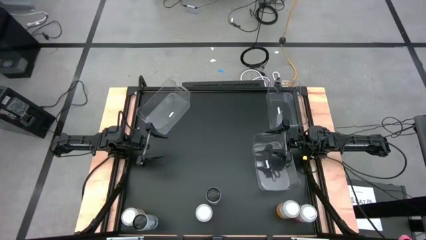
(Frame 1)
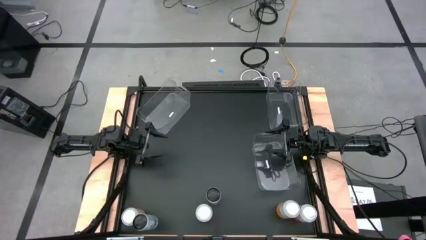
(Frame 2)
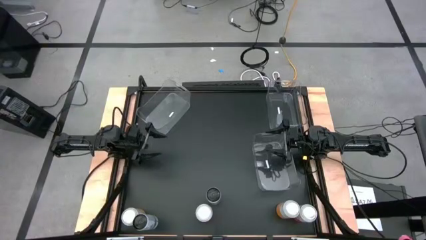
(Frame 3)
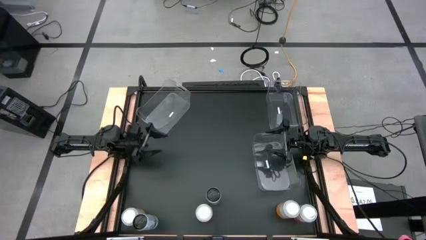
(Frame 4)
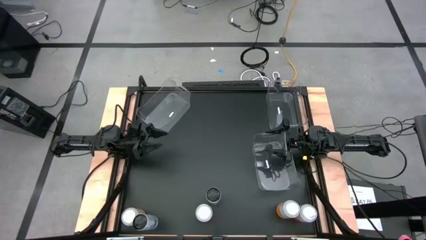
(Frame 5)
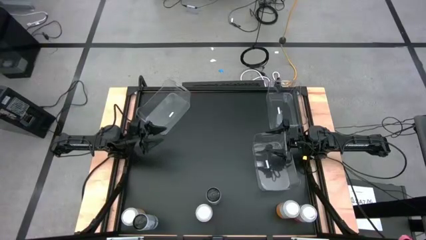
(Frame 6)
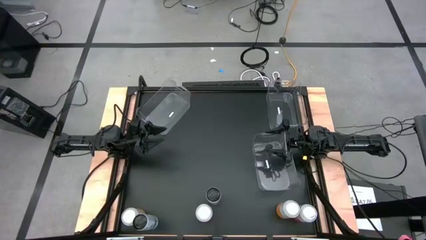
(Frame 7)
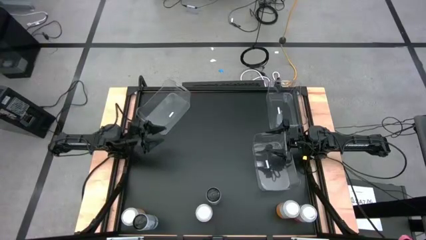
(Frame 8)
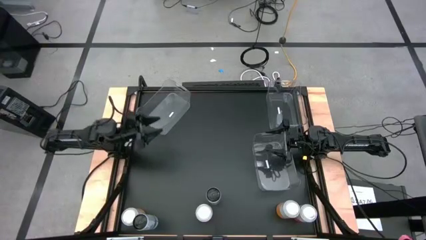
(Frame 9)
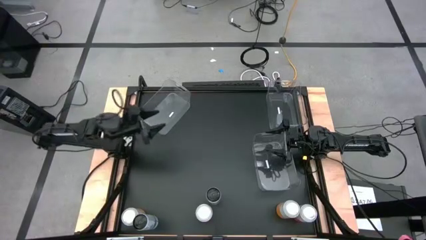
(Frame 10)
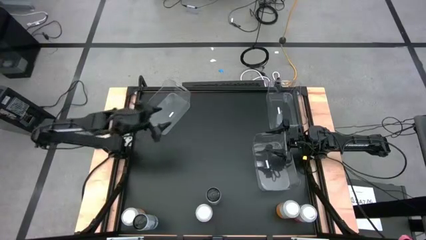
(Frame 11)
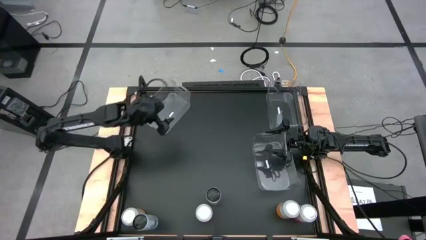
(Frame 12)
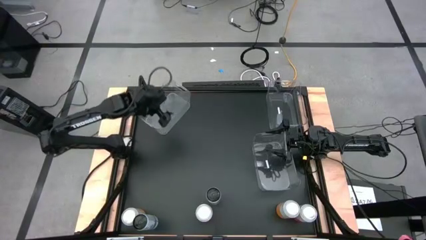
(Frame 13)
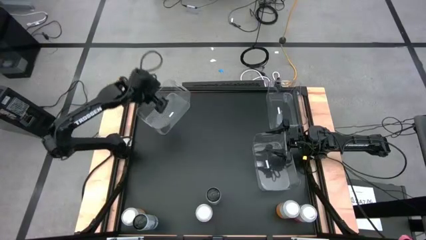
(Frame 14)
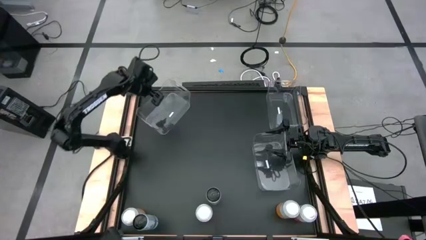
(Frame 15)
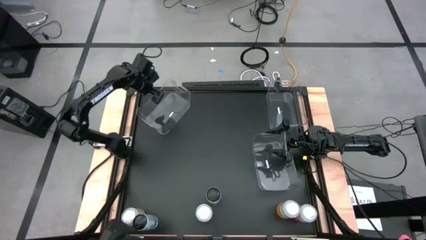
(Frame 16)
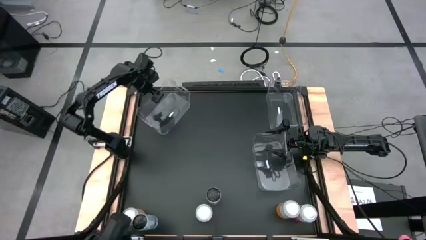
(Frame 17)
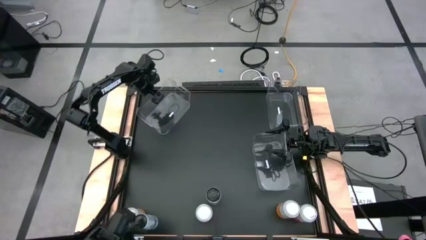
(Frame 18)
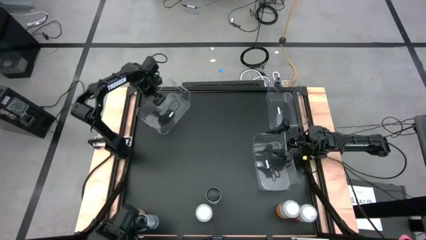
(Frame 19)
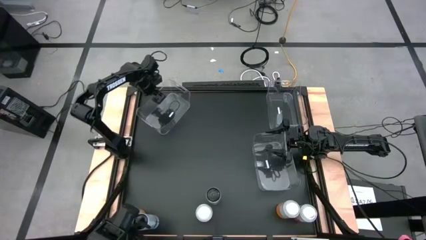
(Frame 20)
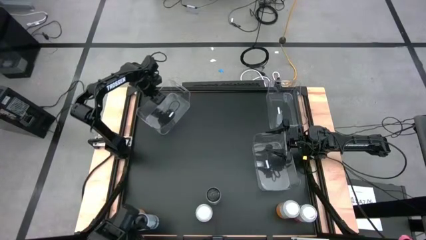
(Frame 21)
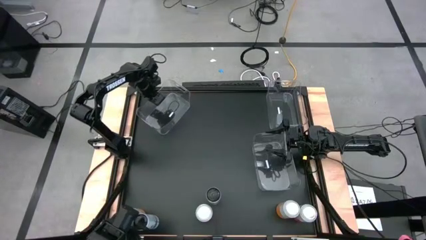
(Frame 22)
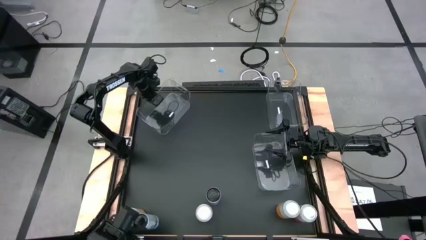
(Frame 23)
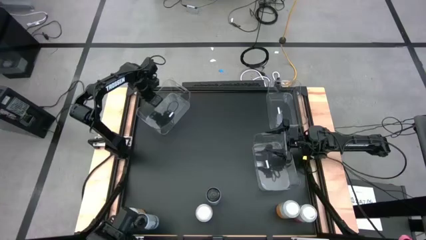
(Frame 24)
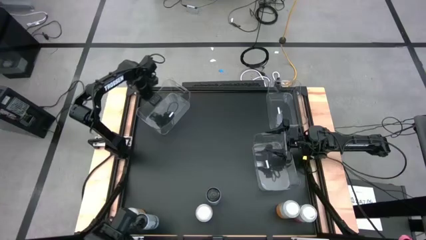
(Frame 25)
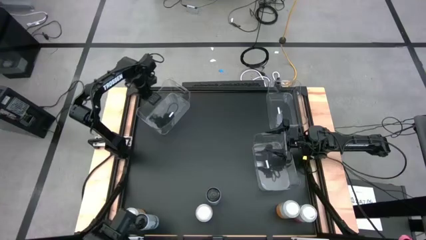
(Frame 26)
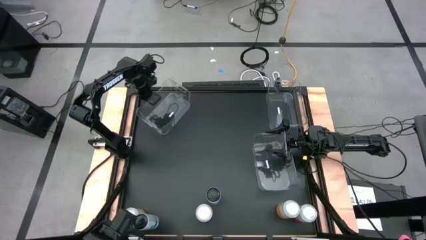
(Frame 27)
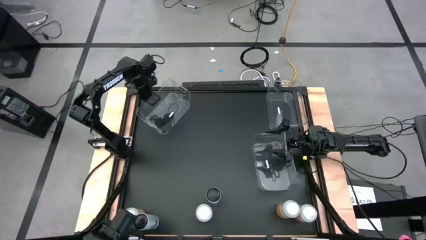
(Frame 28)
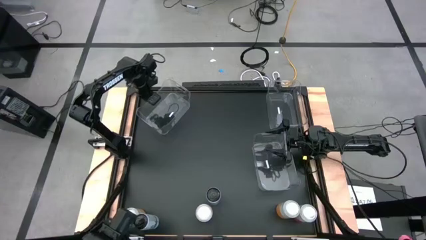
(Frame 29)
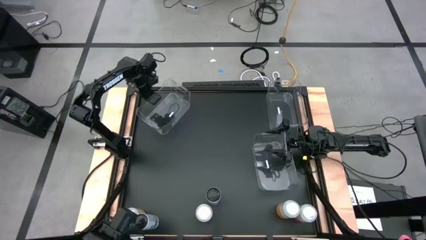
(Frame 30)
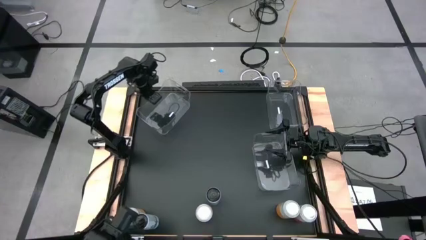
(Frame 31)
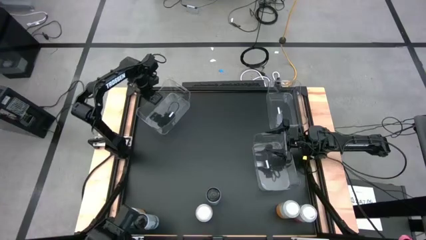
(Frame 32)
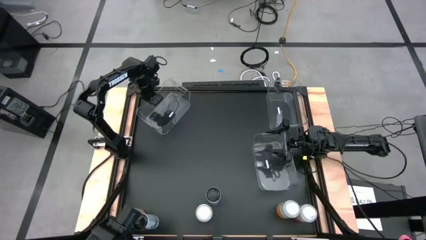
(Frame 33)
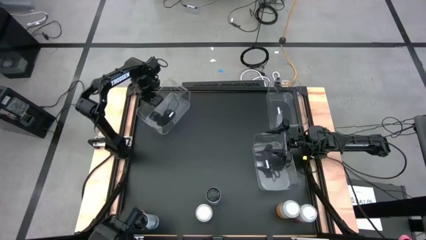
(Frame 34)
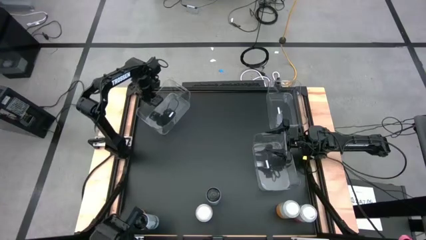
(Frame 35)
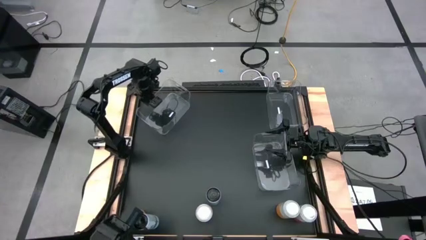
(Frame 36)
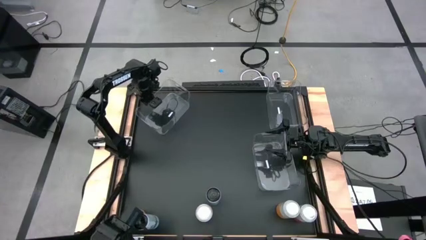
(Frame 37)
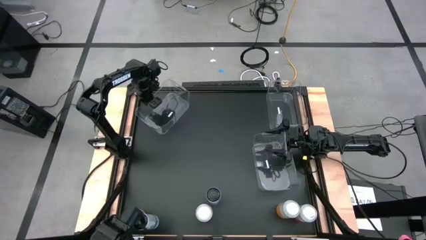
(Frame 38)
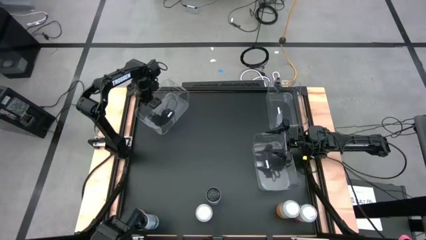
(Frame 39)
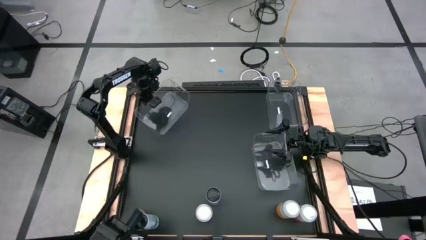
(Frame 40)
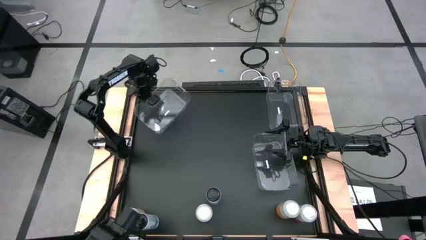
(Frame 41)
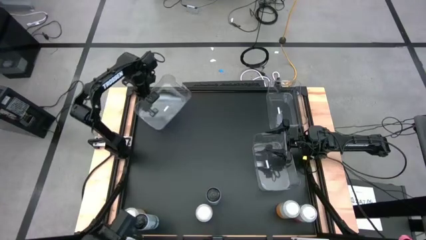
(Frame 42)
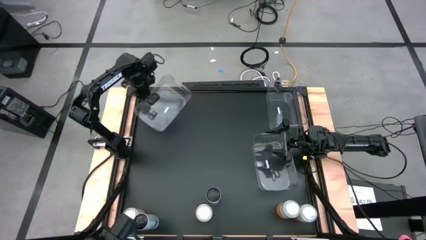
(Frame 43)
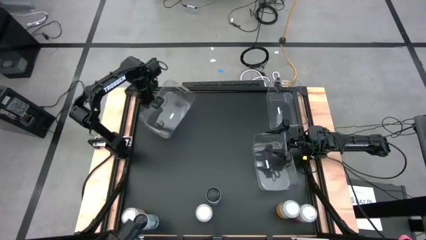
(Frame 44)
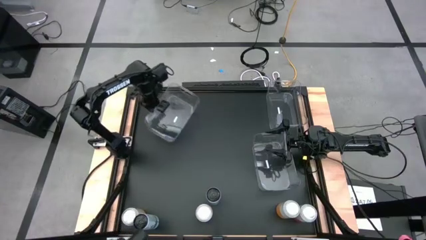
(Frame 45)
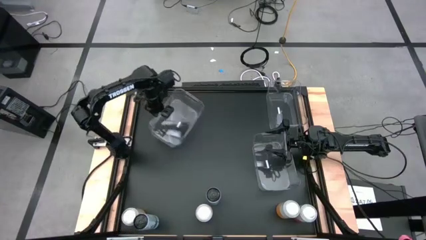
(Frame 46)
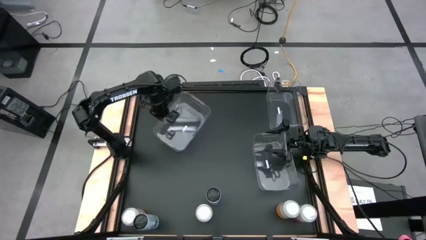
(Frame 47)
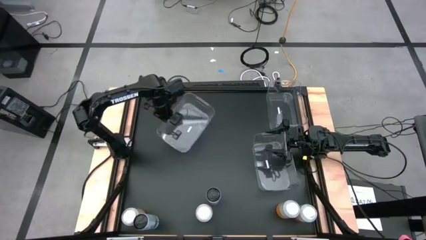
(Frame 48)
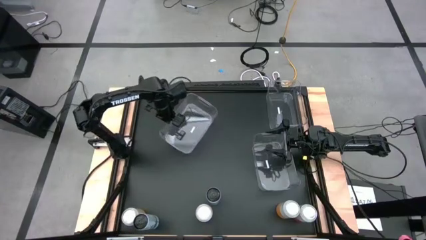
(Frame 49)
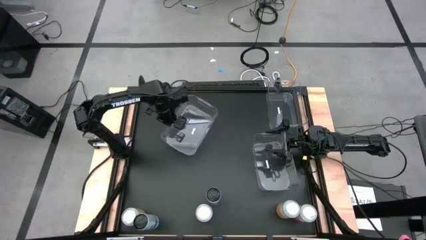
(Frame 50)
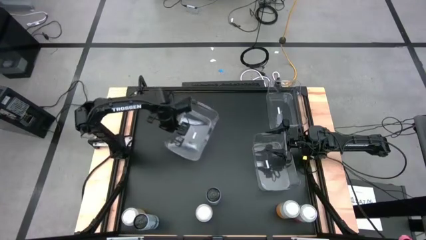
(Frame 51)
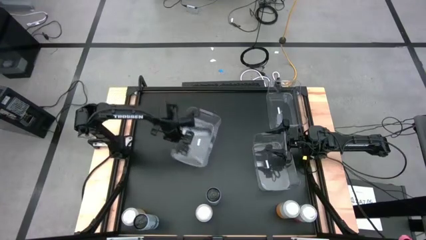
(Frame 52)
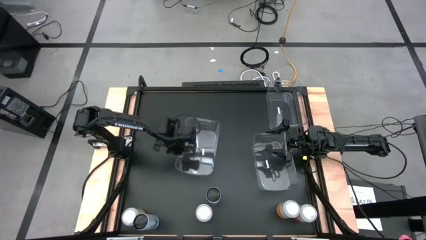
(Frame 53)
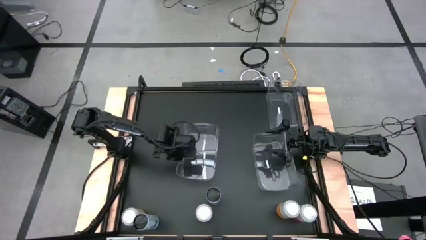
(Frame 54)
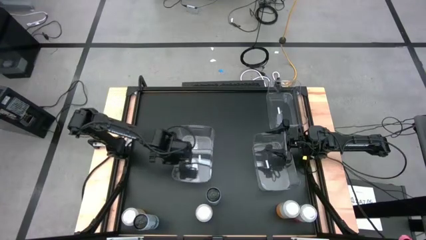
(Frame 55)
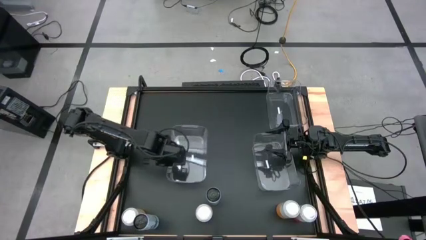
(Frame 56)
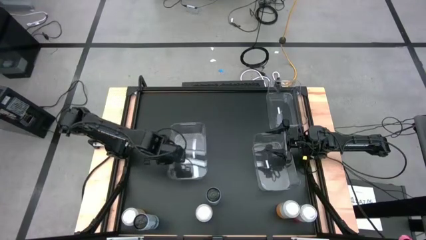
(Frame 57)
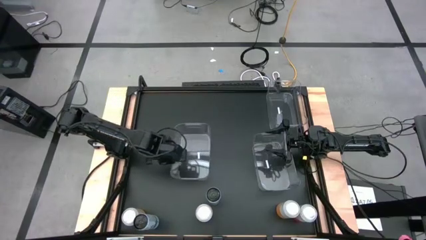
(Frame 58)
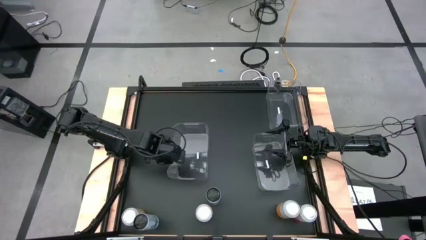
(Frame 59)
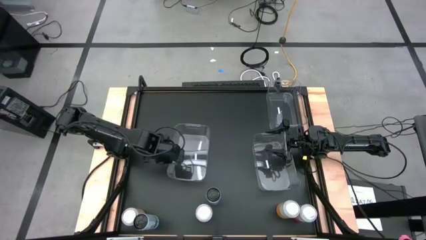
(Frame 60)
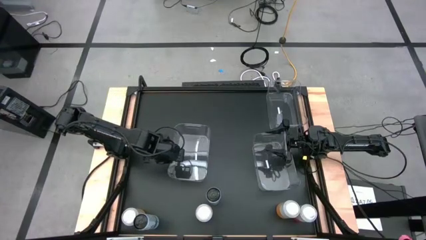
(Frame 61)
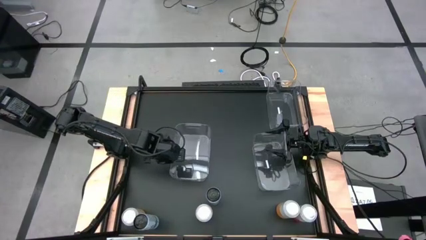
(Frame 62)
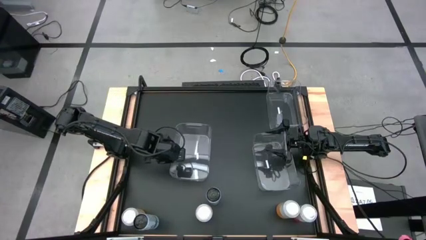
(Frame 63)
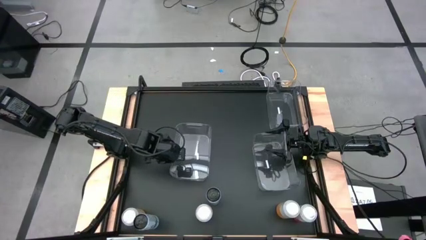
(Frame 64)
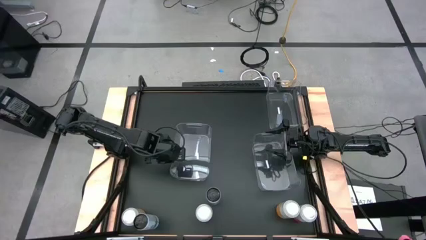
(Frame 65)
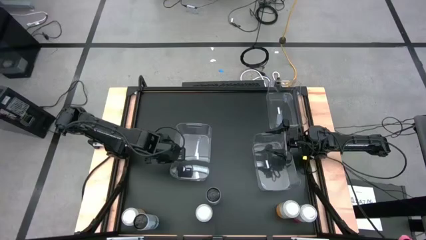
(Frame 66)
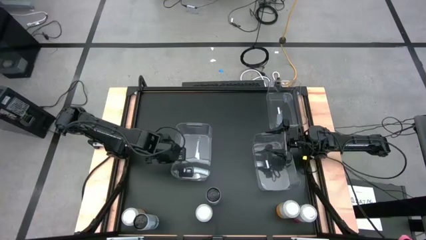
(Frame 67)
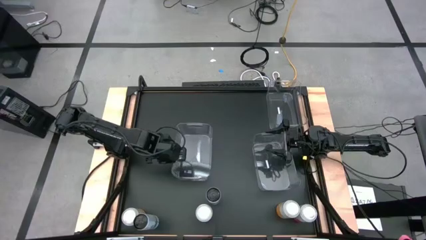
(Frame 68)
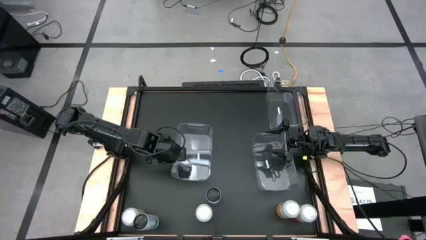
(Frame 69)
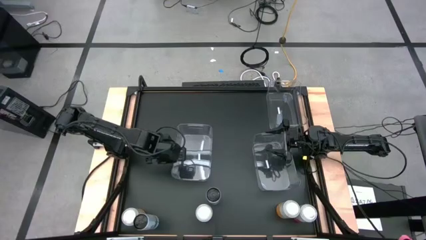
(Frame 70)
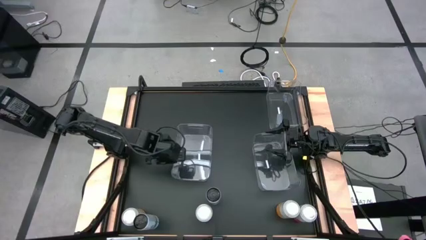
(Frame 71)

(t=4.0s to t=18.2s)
Task: Sort soda cans
Move the top left transparent bin to the middle left of the table
